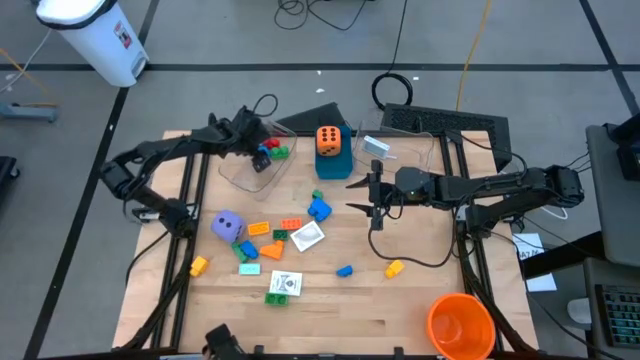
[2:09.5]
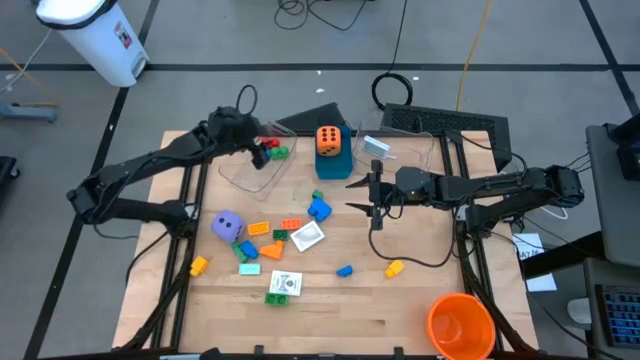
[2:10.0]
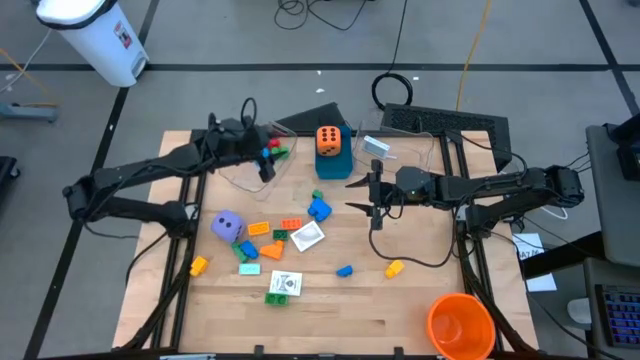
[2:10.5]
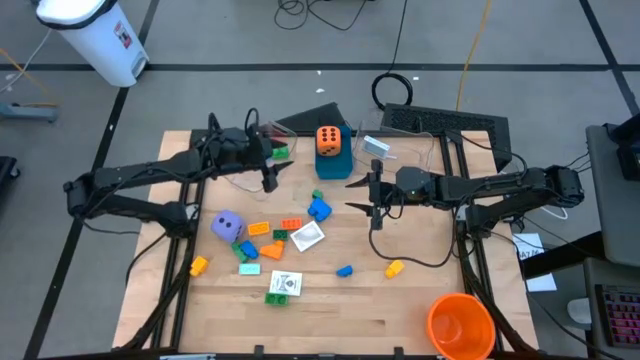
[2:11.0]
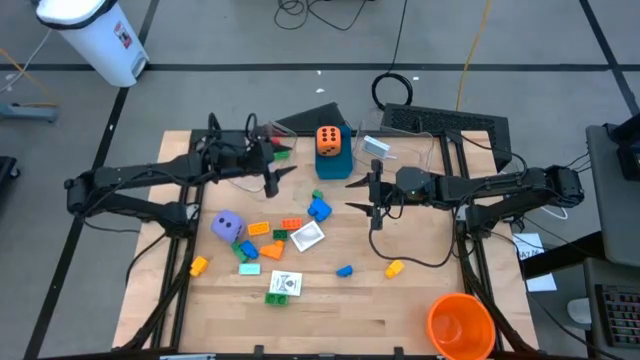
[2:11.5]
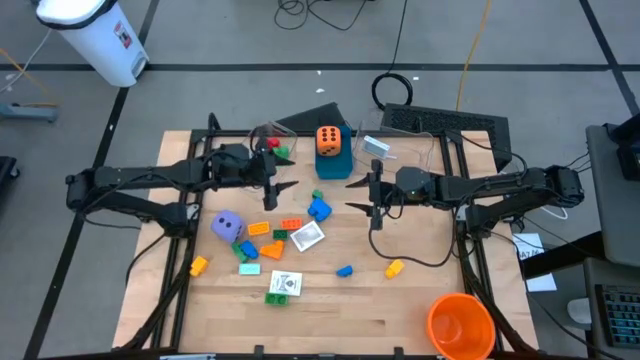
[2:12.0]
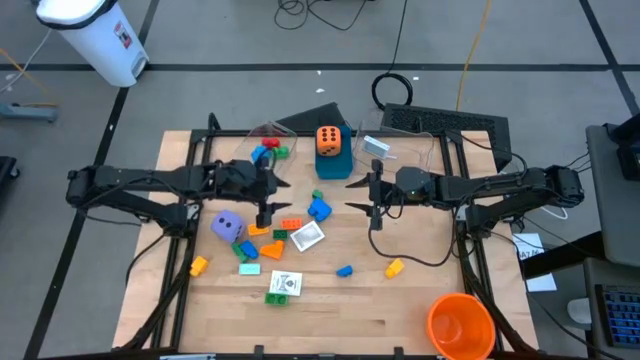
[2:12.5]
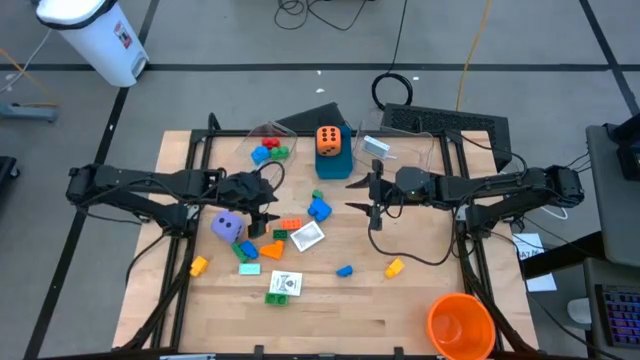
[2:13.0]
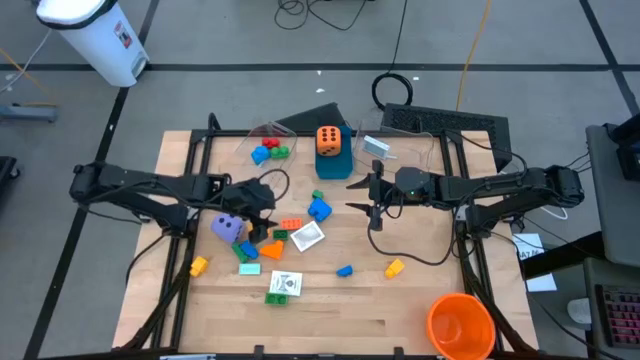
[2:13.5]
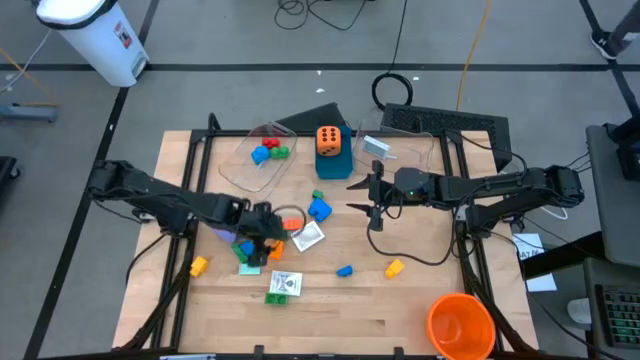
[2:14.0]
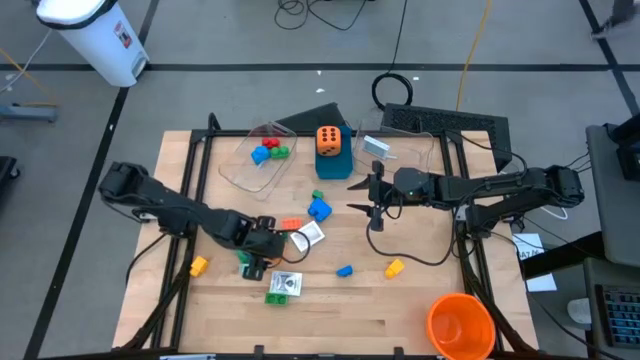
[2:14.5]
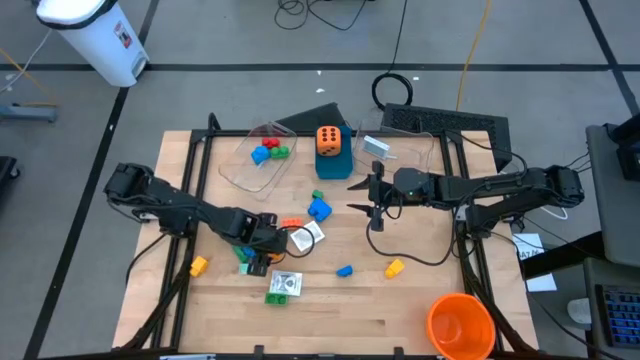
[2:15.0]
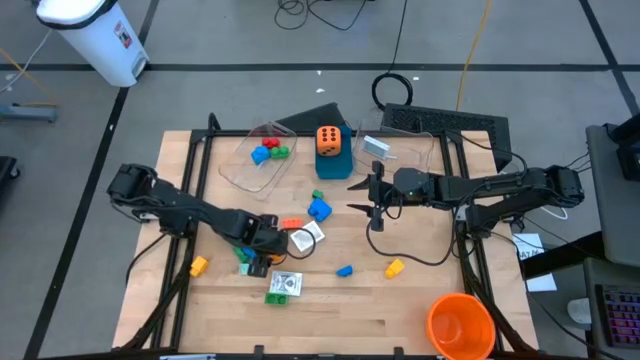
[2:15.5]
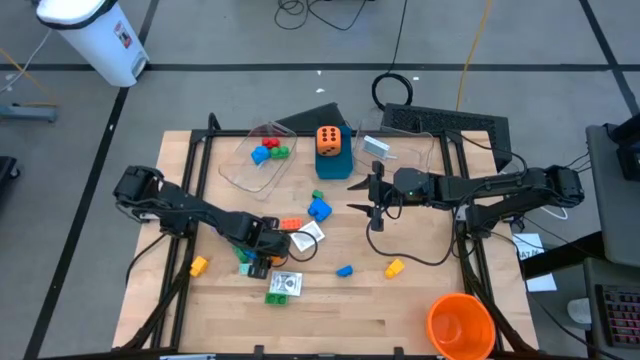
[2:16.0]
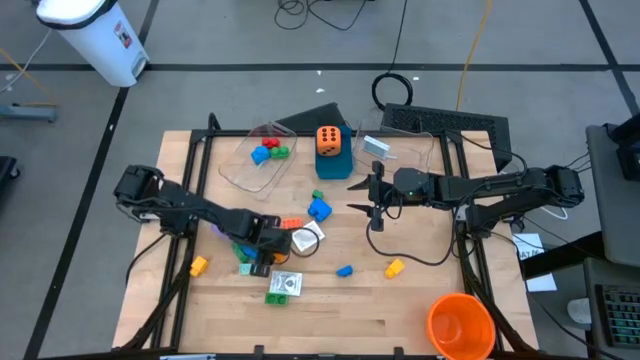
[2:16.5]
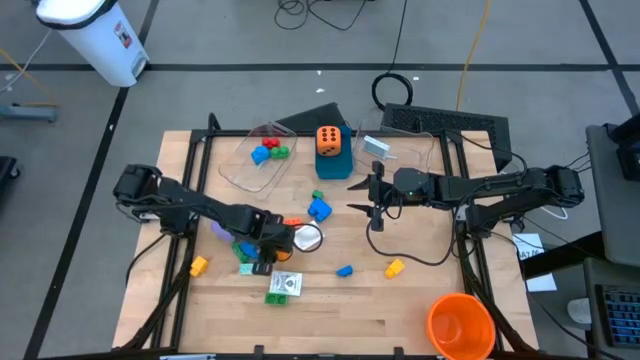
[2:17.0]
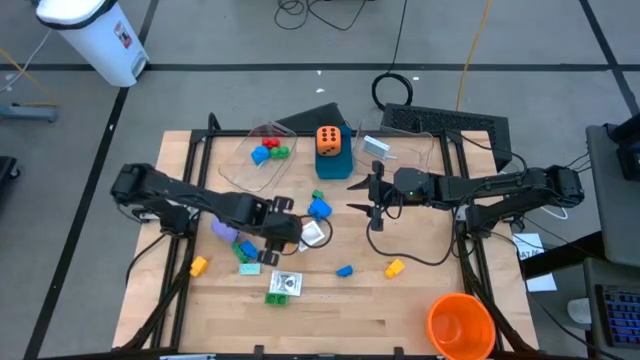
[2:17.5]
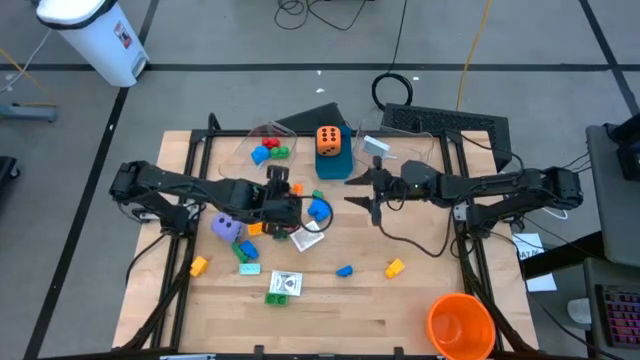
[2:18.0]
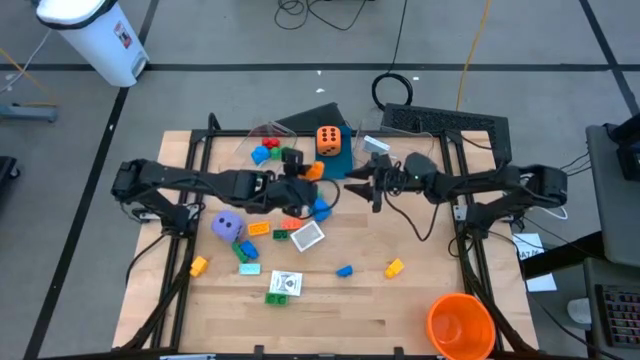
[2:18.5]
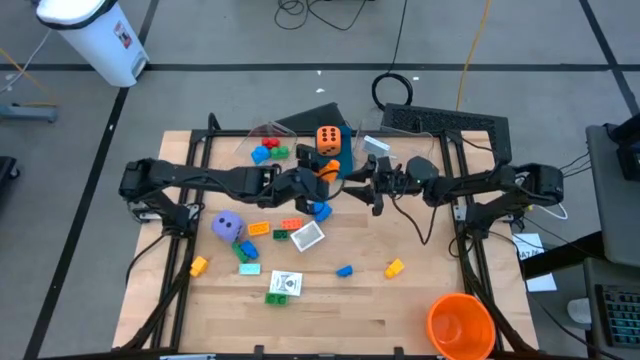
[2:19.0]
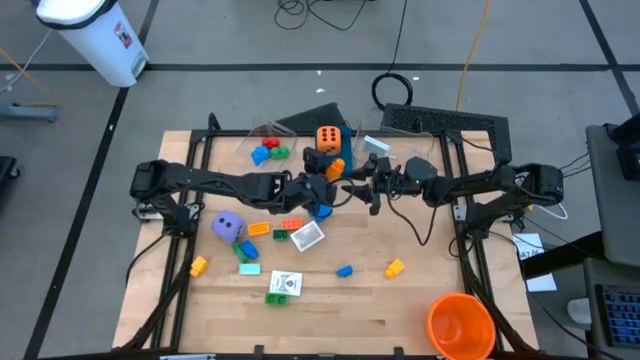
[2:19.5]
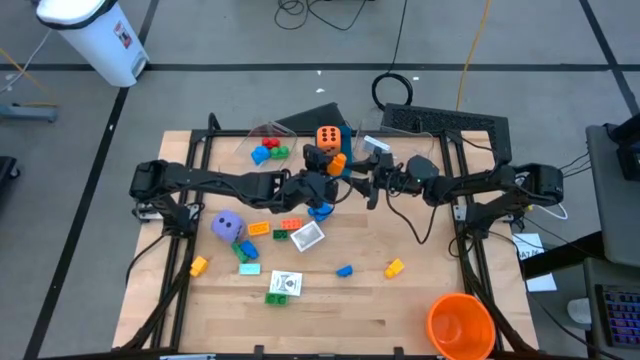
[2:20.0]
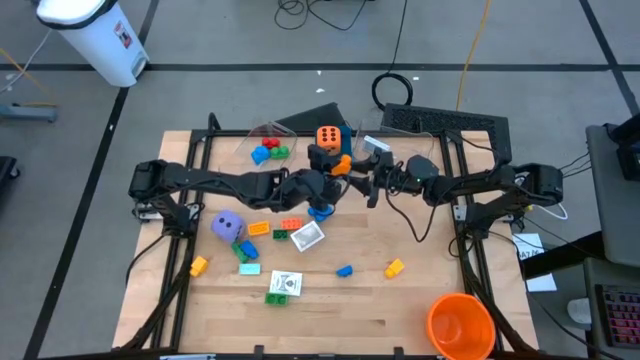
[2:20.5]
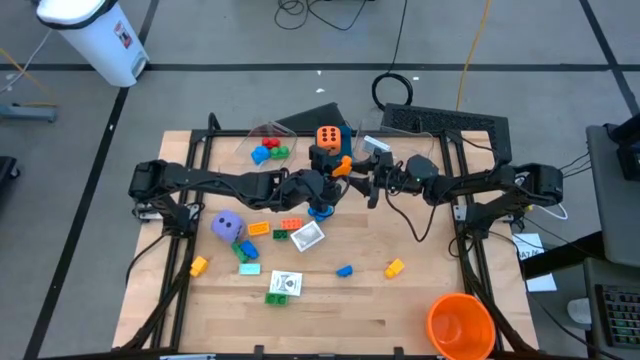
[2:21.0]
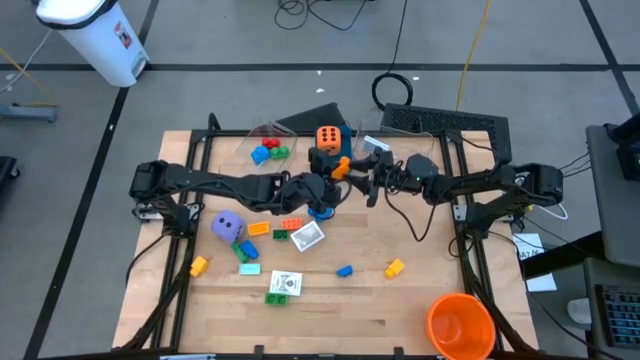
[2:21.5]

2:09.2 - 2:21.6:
Task: Pick & Place Toys
Put the orange game piece into the left transparent bin

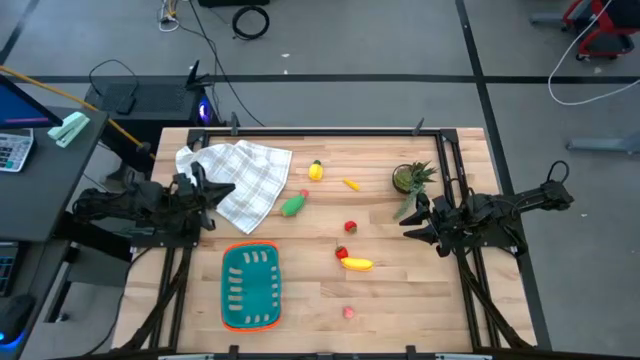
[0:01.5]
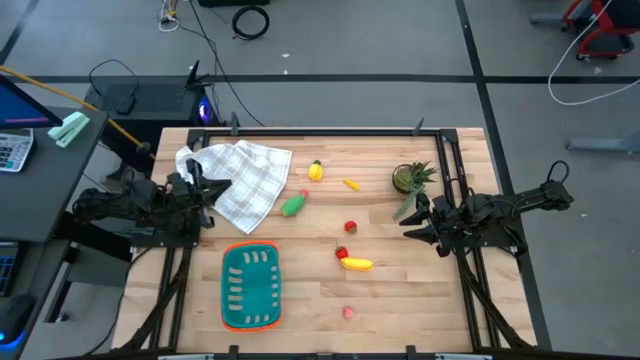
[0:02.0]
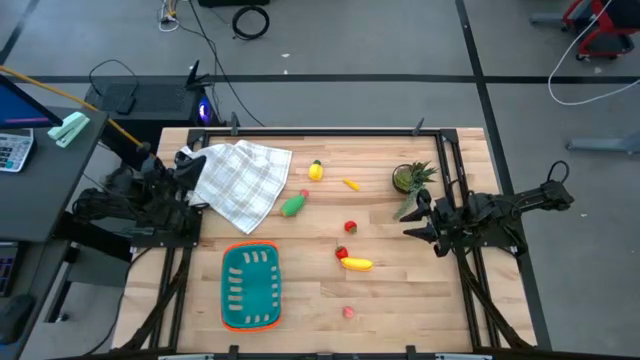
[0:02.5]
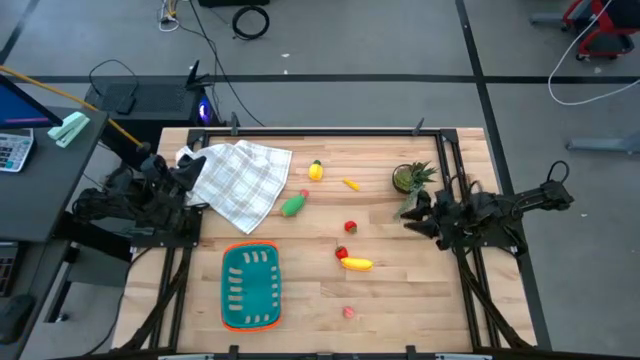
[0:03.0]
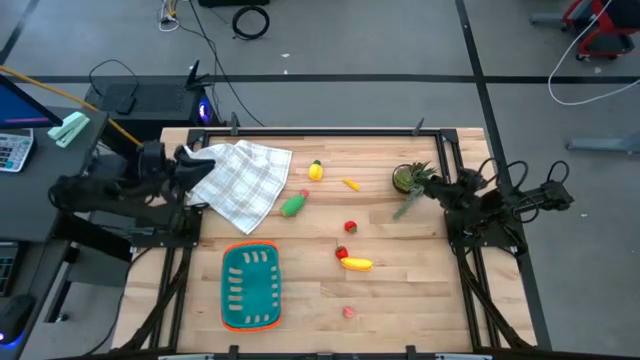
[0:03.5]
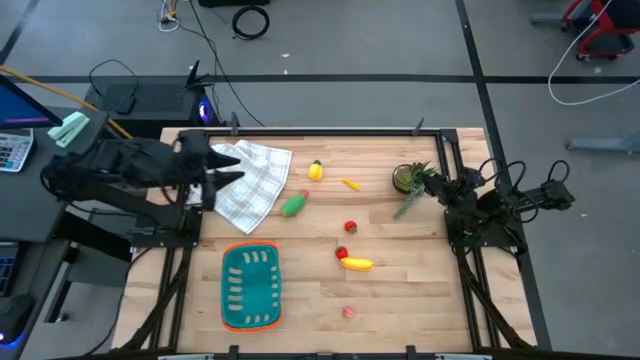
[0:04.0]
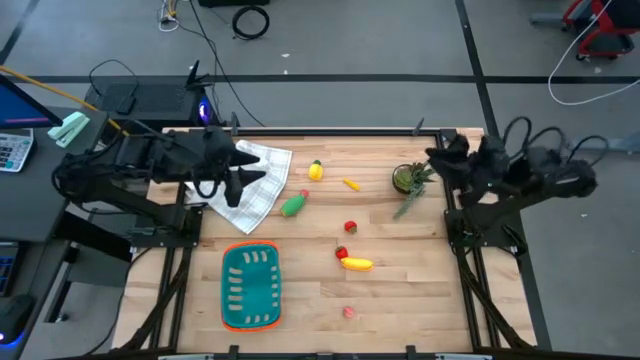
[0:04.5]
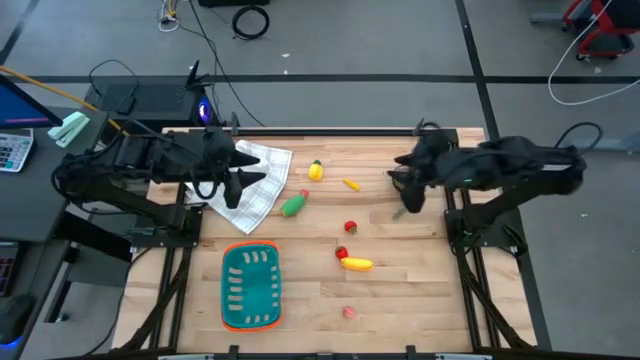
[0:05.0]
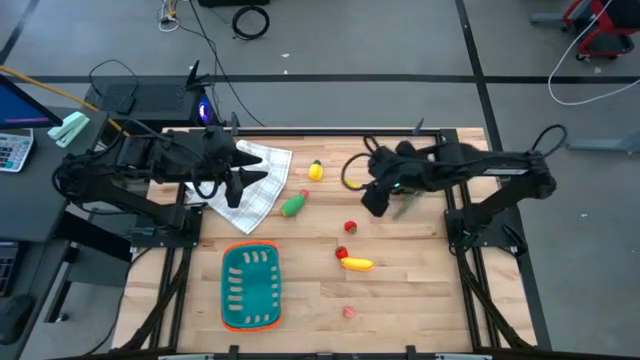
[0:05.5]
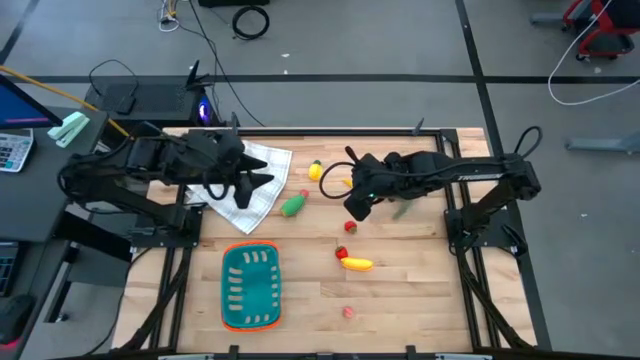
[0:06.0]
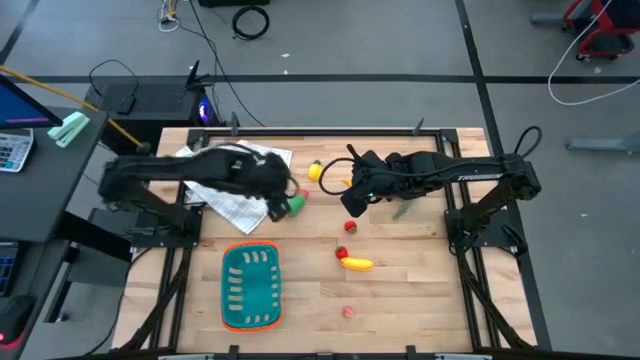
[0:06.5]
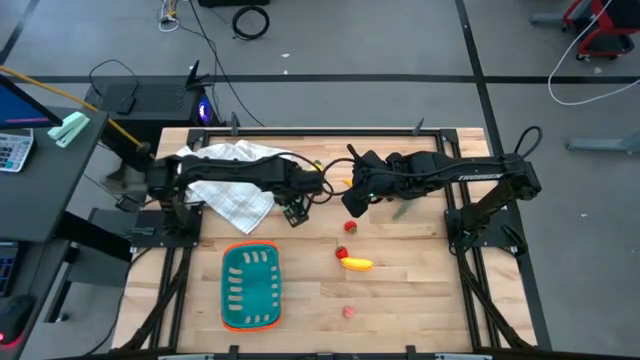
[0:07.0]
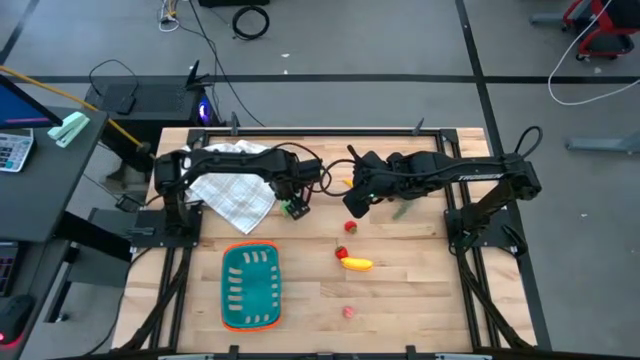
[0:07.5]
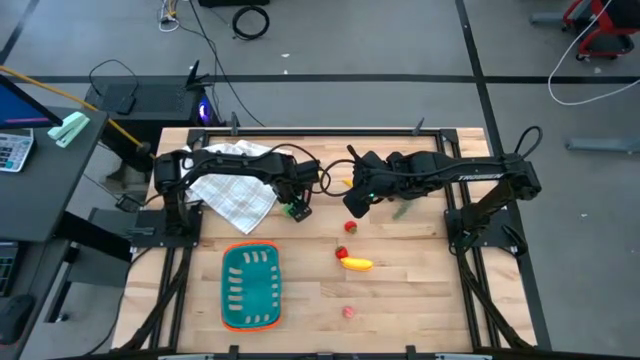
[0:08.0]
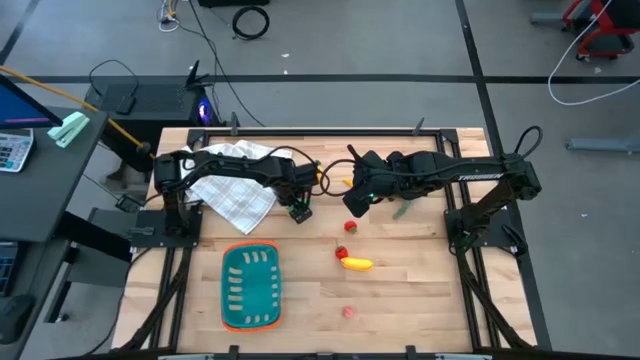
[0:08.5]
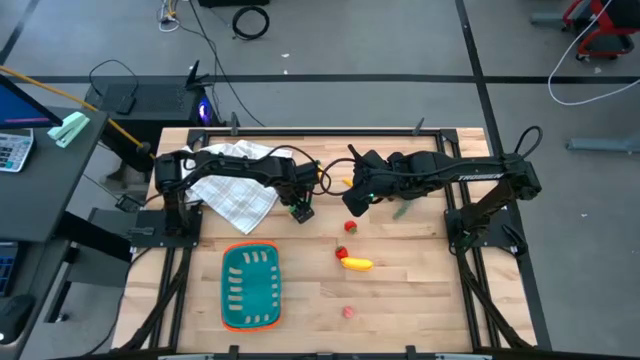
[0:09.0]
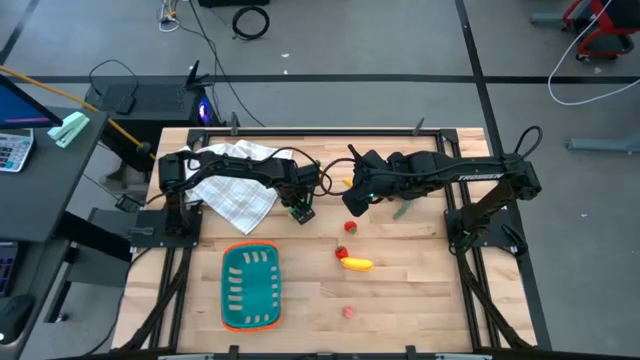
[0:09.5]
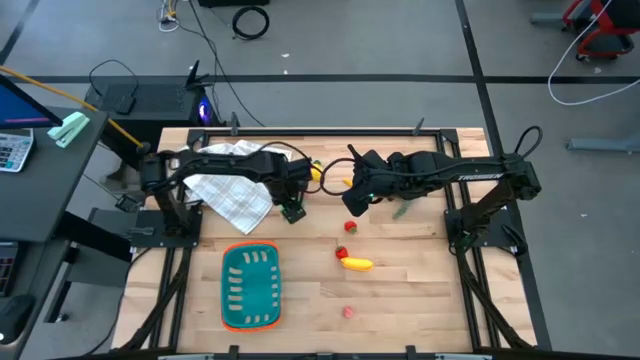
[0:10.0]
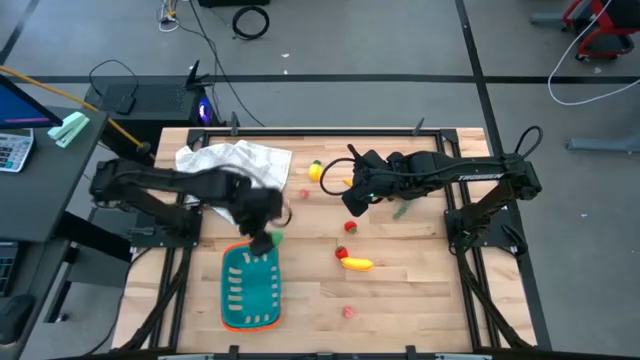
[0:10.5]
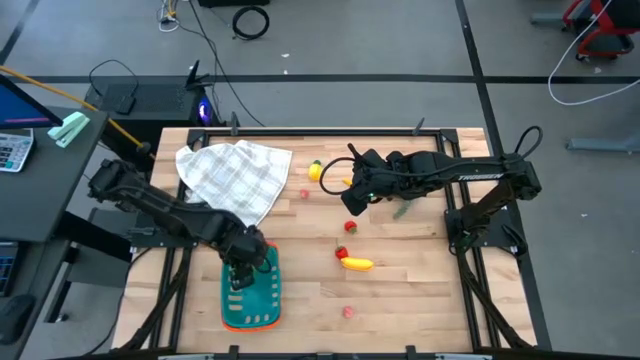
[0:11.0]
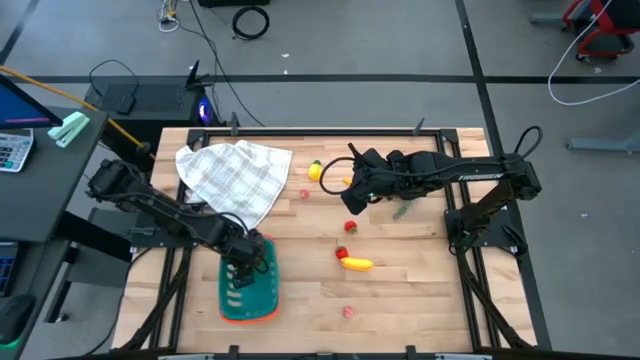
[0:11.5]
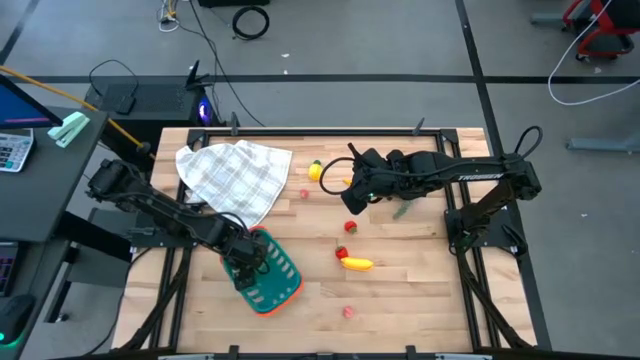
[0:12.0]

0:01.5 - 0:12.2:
Task: Pick and placing Produce into tupperware
Put the green corn into the blue basket
